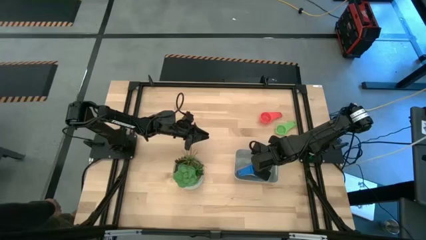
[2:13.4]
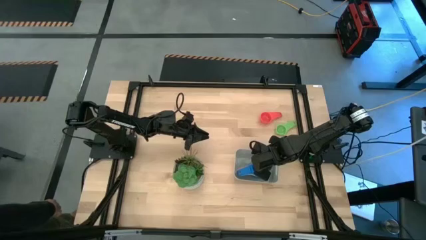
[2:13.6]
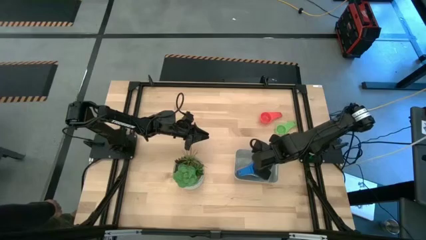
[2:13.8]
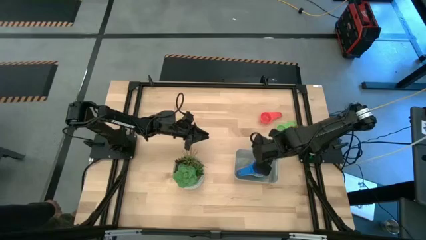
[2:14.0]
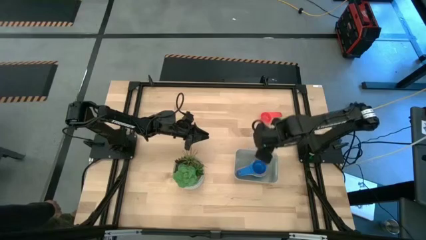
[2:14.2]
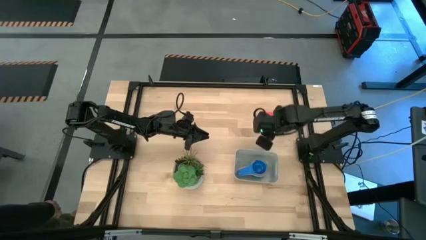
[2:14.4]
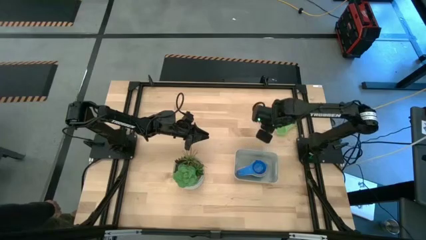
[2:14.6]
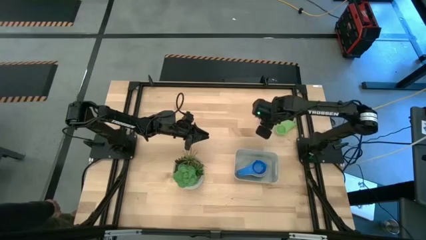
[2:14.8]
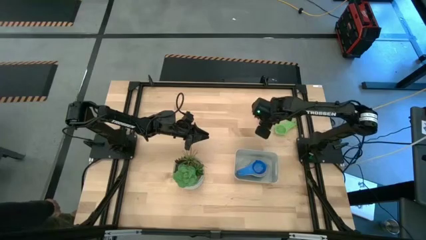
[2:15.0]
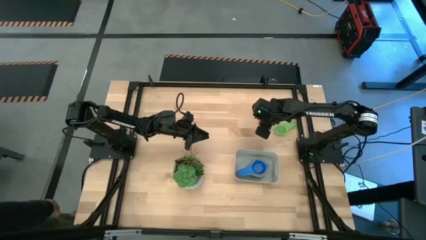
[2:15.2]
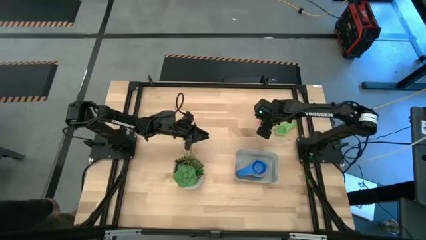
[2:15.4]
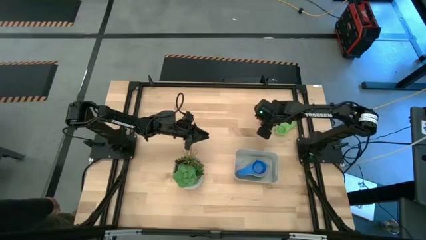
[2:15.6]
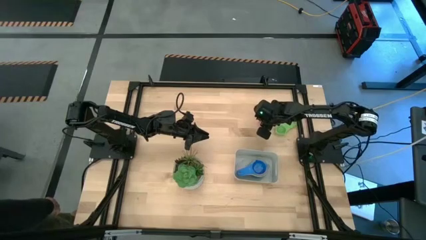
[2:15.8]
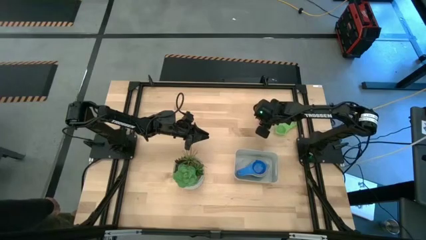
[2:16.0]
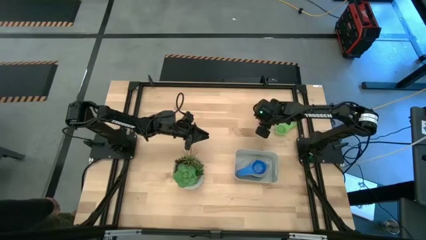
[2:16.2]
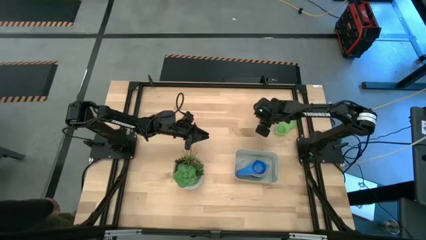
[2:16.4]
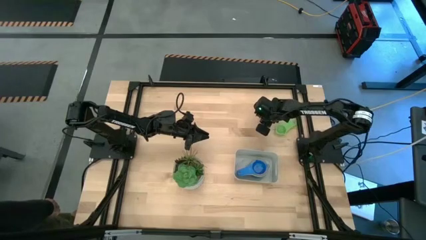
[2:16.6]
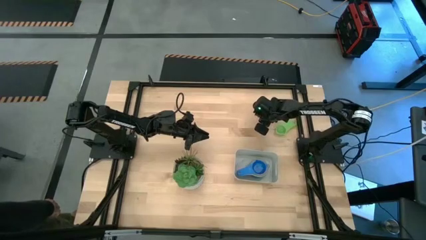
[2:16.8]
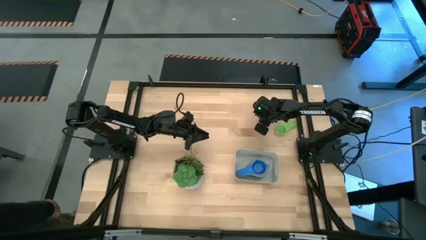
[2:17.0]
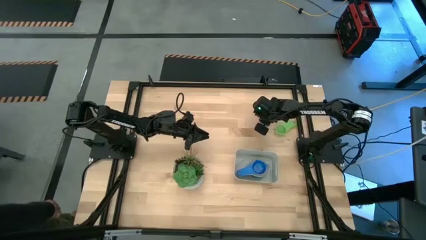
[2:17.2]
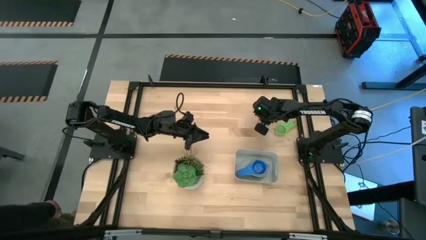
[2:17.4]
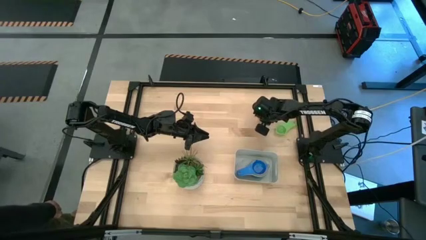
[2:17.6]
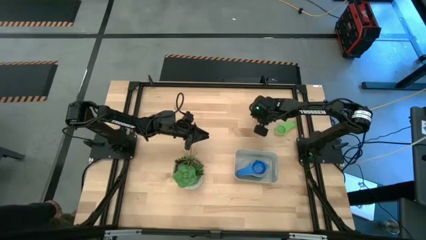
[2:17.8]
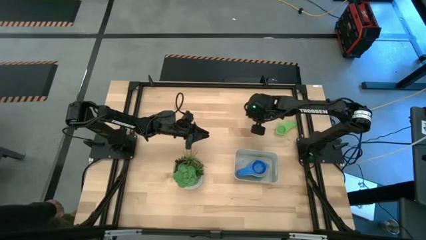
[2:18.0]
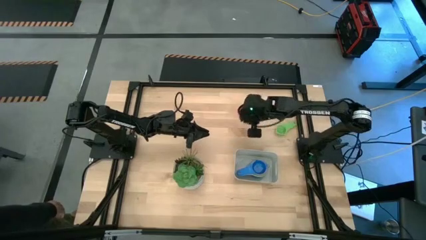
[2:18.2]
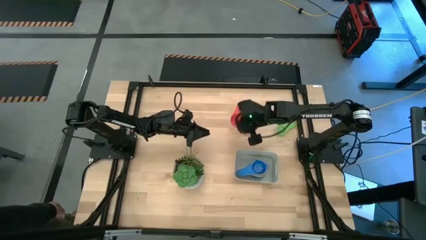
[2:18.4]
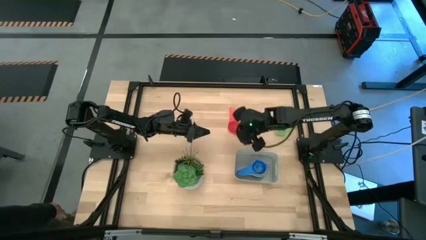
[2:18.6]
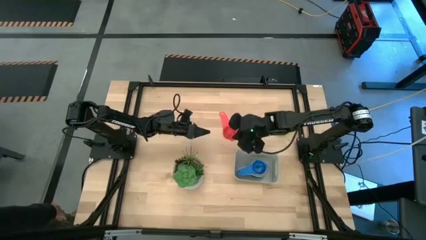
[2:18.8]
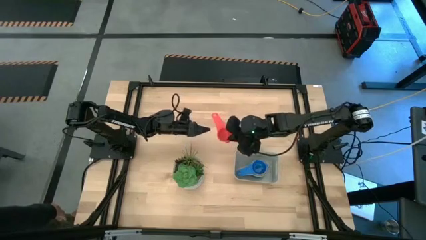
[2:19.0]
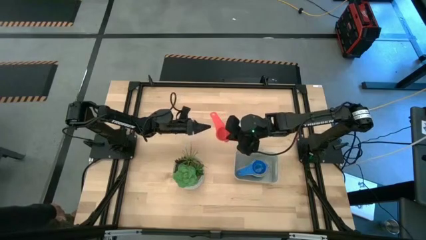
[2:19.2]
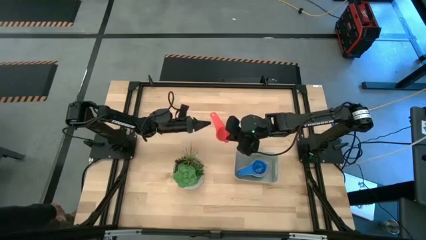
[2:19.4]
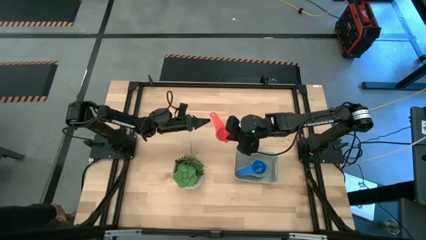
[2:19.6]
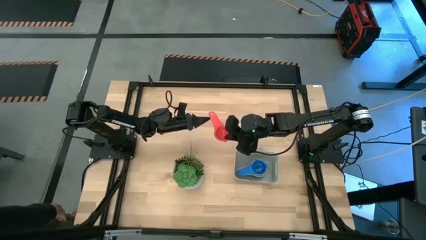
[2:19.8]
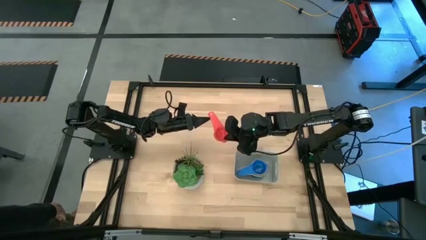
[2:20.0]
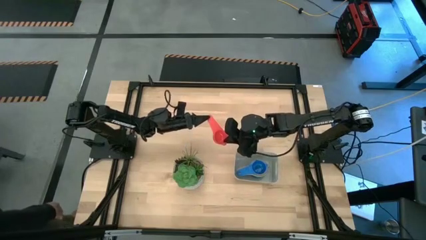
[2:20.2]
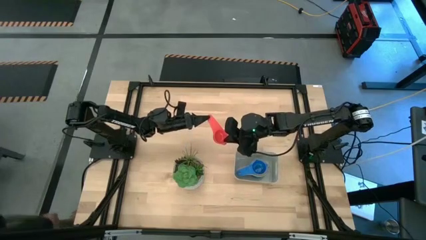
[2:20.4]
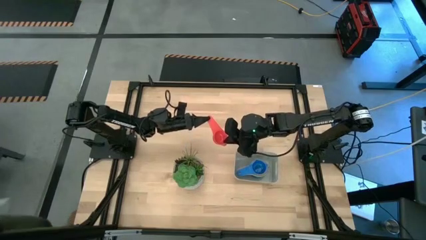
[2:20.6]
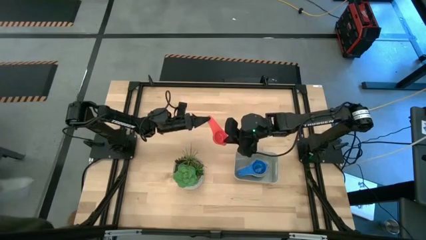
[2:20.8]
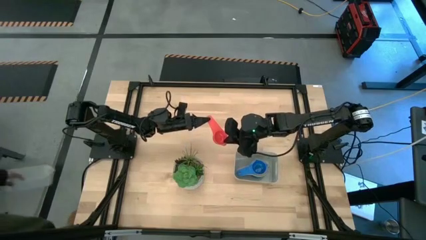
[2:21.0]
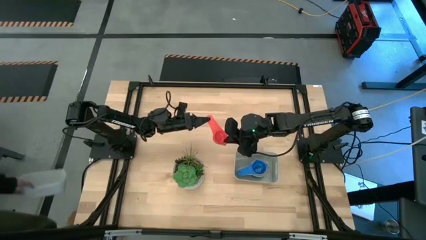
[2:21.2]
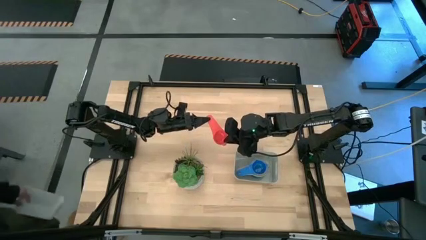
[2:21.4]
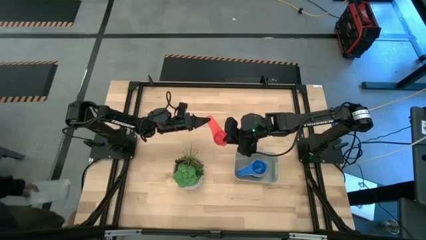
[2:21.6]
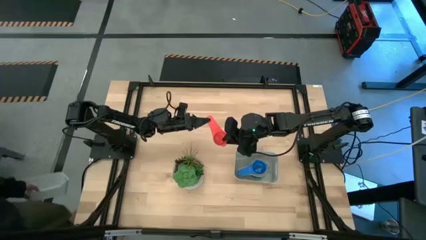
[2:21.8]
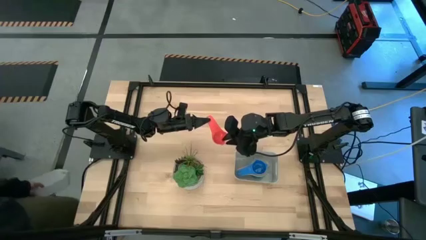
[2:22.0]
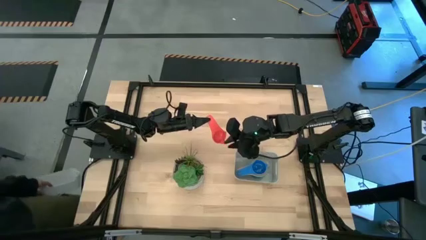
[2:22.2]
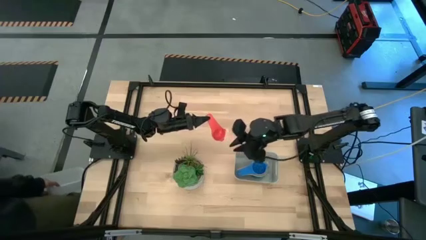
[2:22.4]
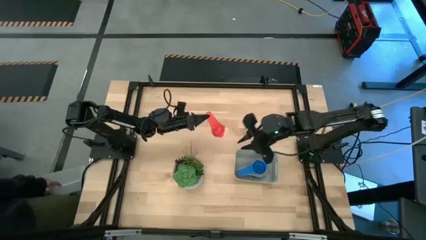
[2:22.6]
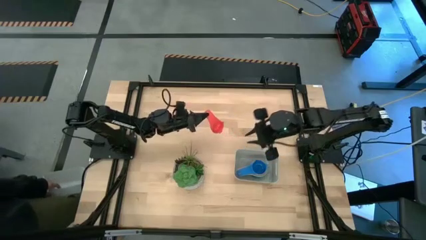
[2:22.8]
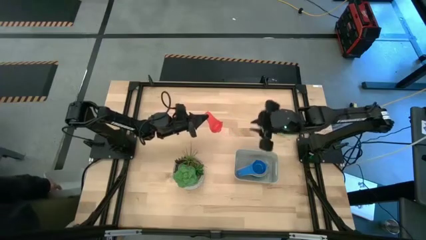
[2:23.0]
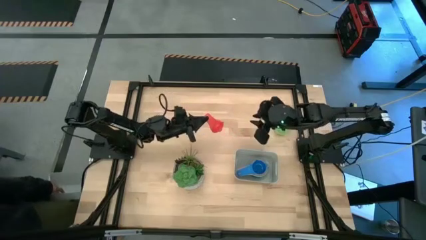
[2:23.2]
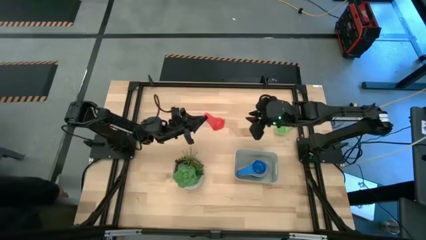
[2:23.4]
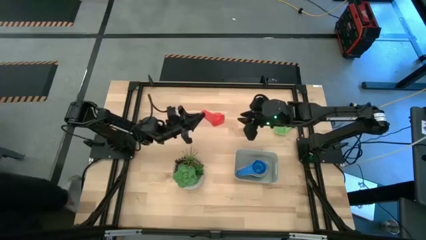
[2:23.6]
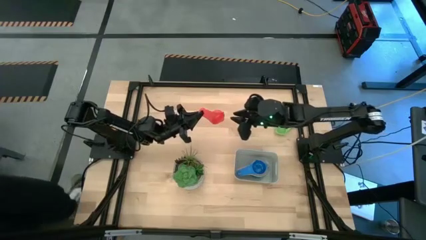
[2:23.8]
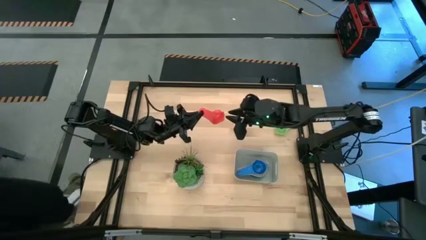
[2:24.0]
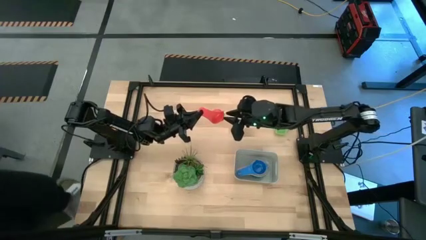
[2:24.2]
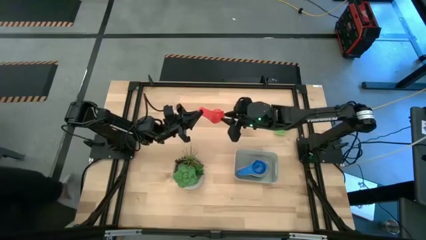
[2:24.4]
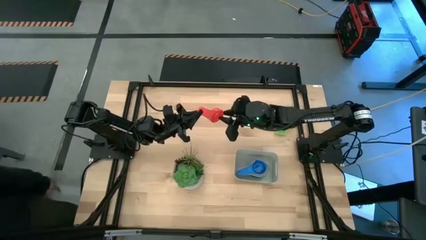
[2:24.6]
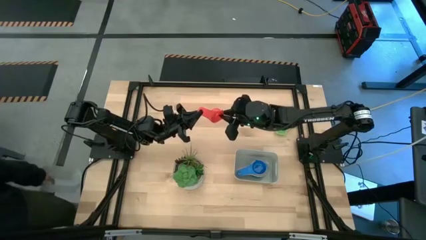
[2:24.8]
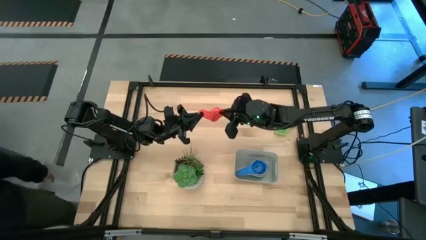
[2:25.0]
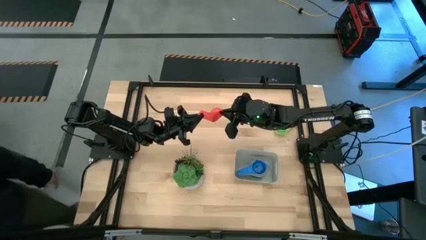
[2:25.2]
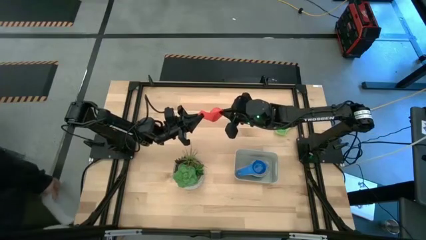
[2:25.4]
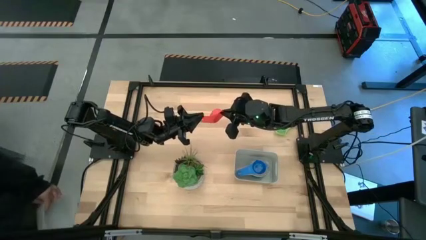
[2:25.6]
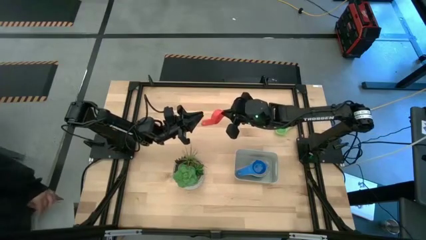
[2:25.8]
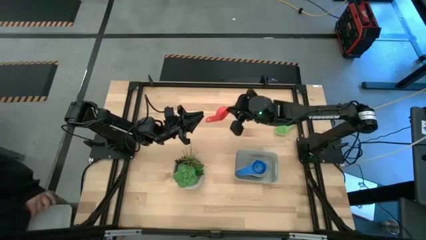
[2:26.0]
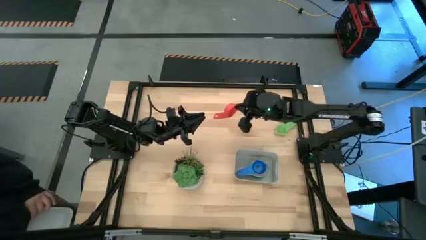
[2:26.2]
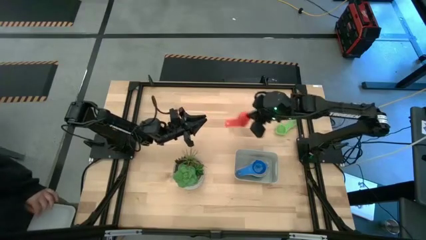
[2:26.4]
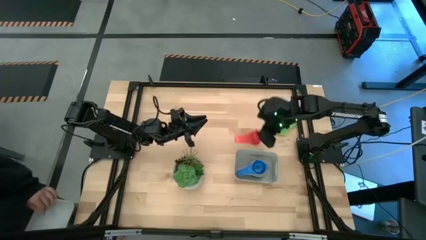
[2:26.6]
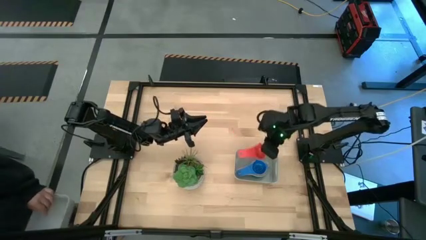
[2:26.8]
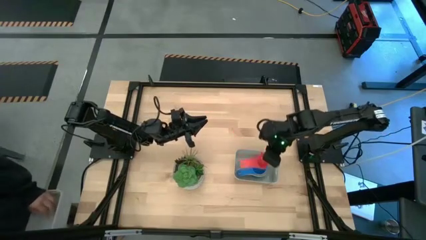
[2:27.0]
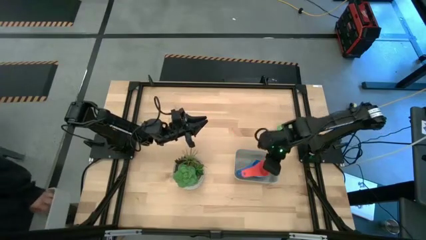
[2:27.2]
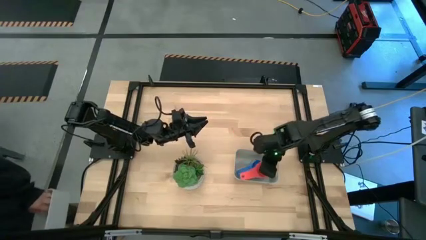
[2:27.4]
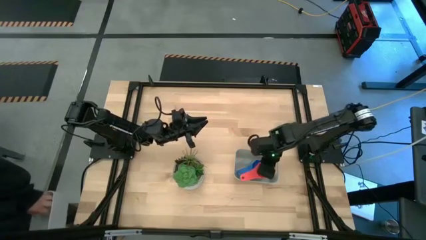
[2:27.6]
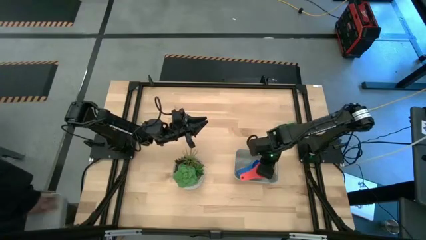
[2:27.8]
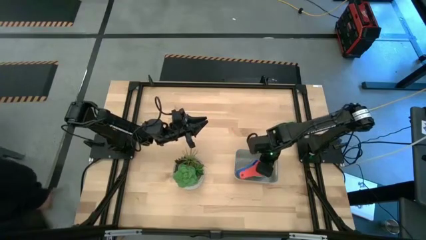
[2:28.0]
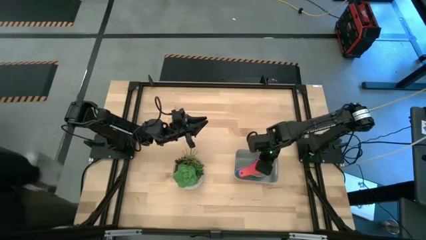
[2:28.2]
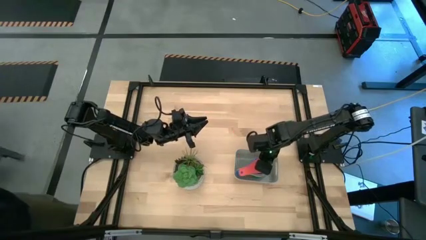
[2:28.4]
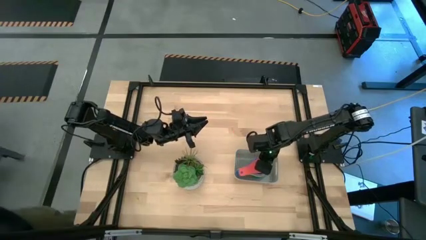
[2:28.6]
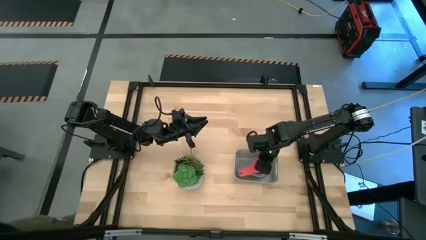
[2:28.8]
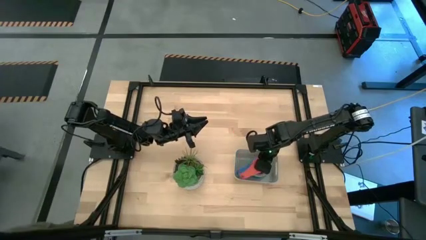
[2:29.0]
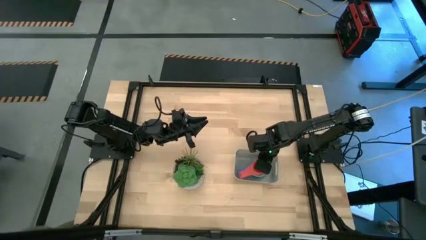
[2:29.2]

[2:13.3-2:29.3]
Task: Nest measuring cups in basket
Stack the red measuring cup on top of the blue measuring cup in the grey bin
